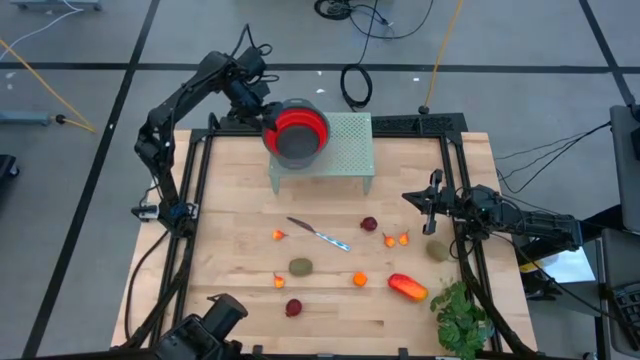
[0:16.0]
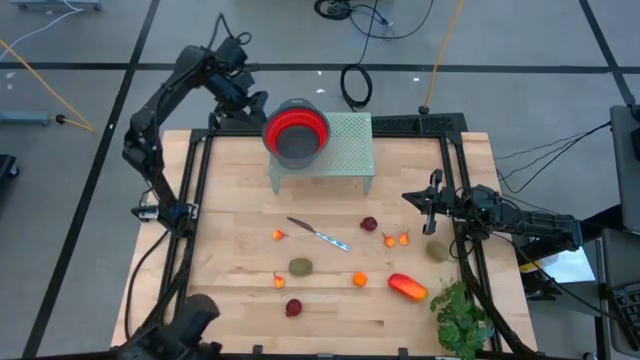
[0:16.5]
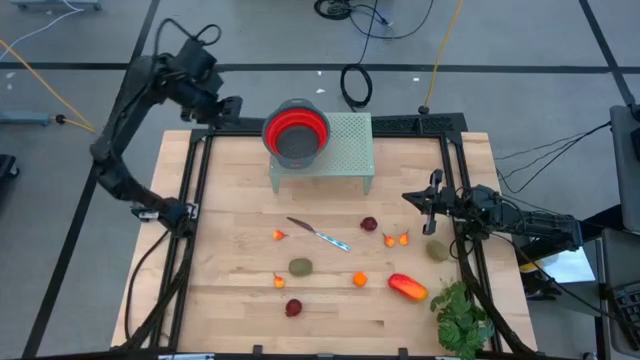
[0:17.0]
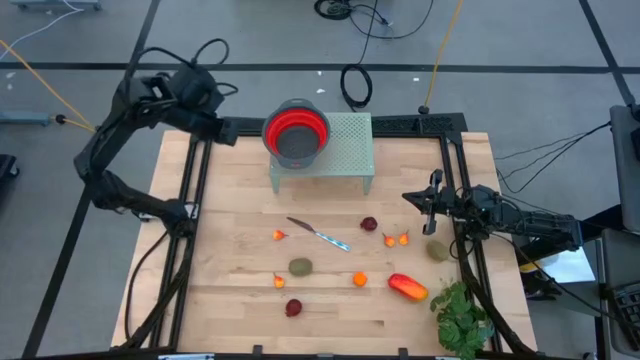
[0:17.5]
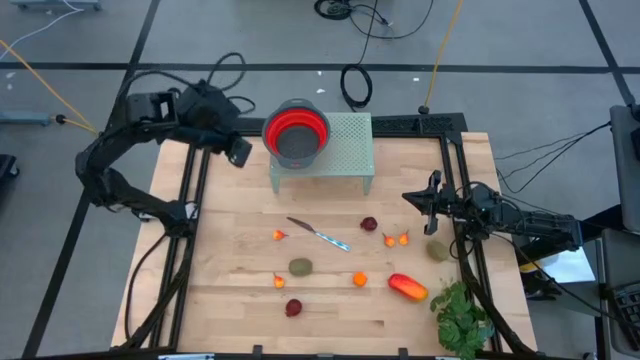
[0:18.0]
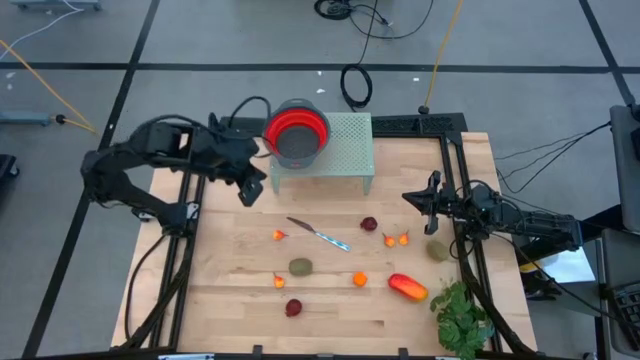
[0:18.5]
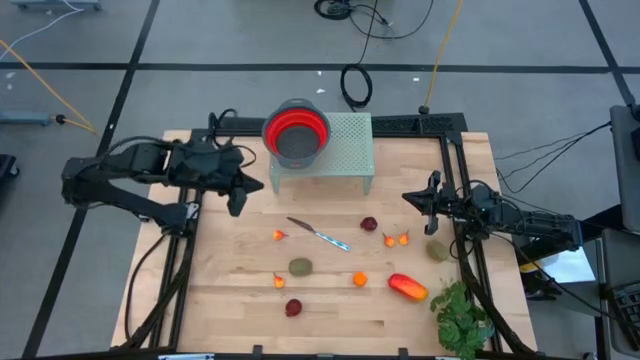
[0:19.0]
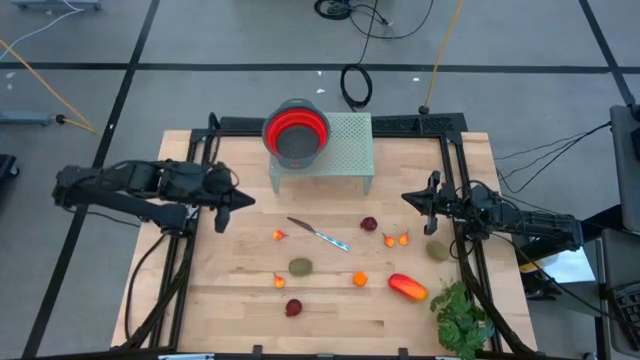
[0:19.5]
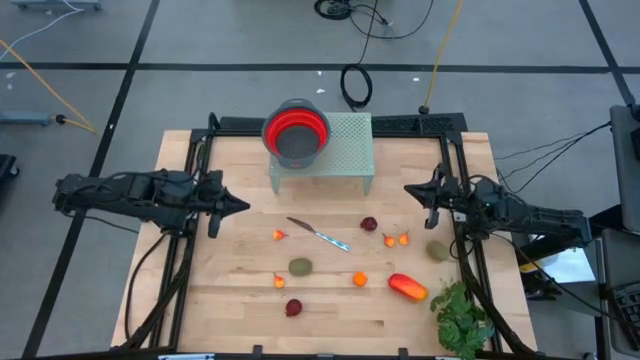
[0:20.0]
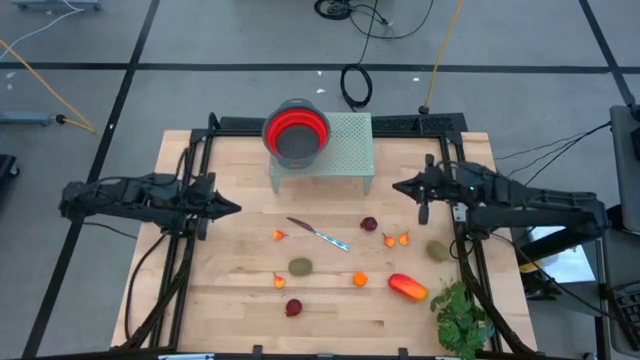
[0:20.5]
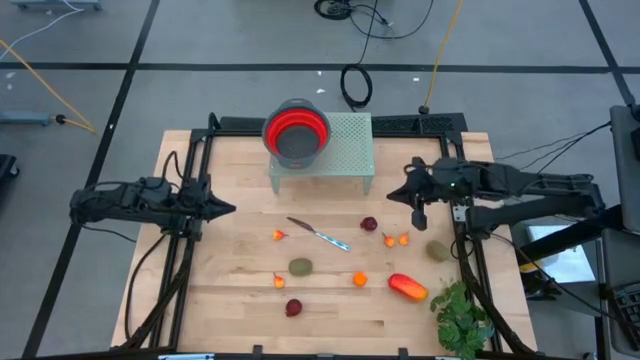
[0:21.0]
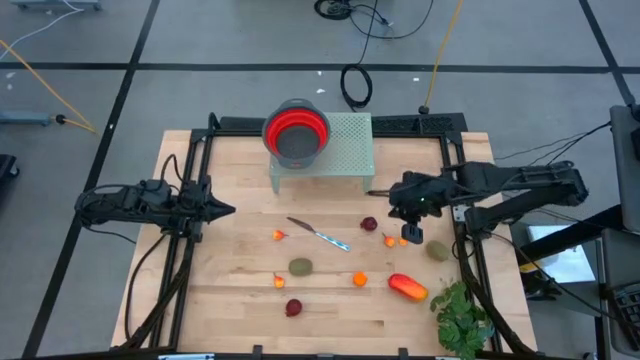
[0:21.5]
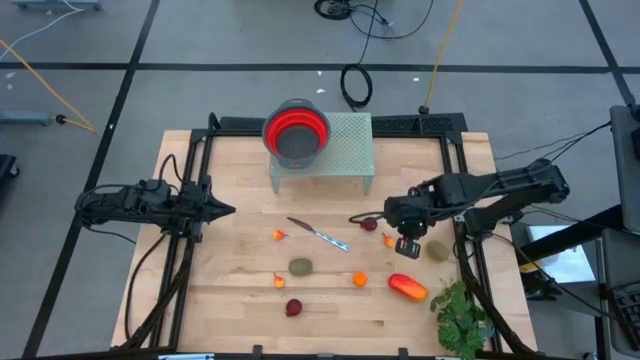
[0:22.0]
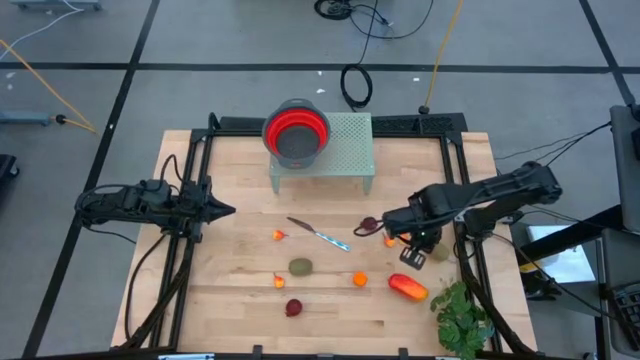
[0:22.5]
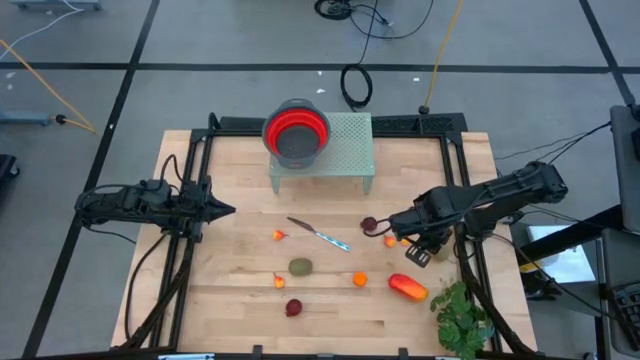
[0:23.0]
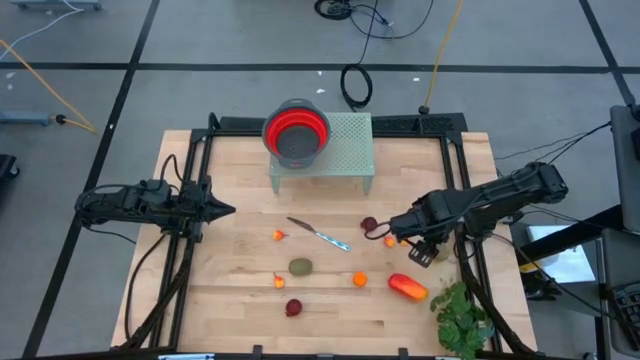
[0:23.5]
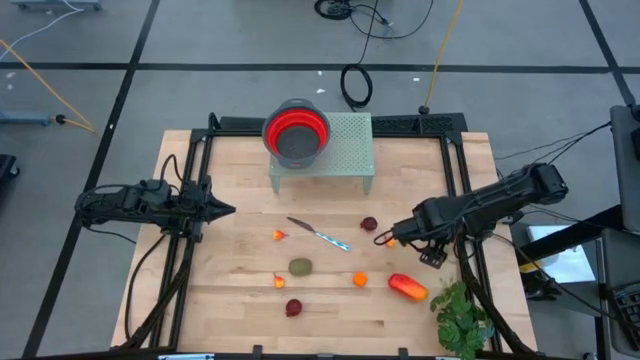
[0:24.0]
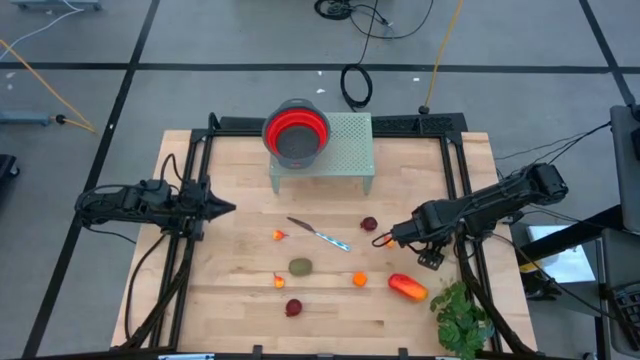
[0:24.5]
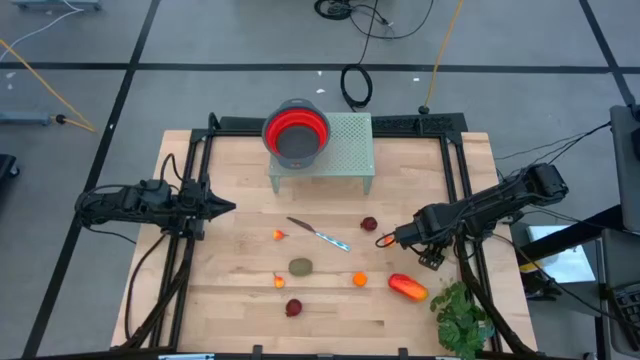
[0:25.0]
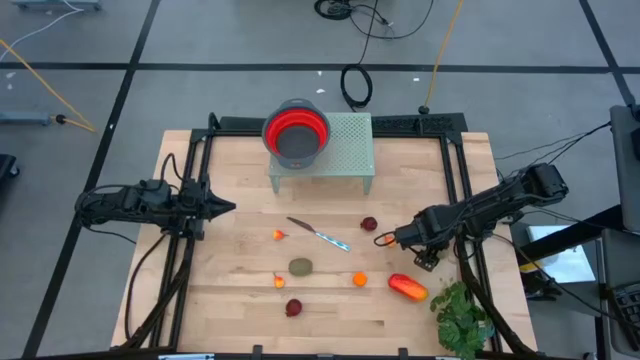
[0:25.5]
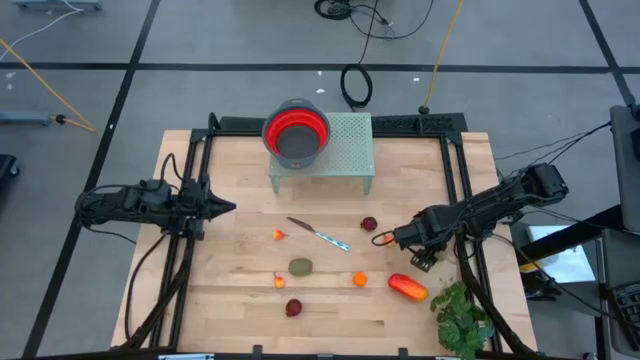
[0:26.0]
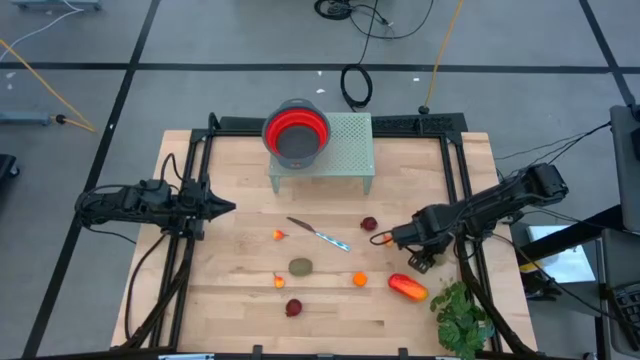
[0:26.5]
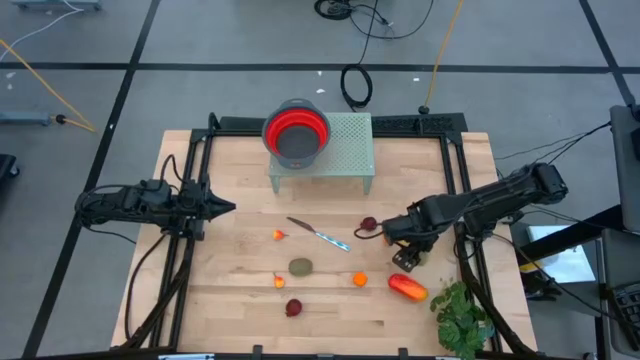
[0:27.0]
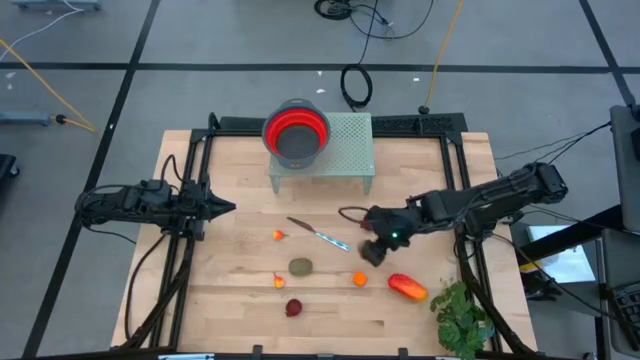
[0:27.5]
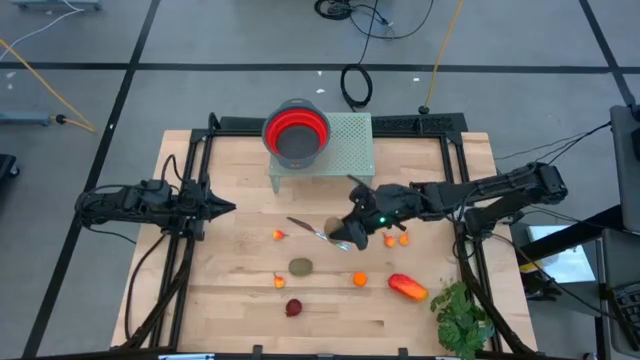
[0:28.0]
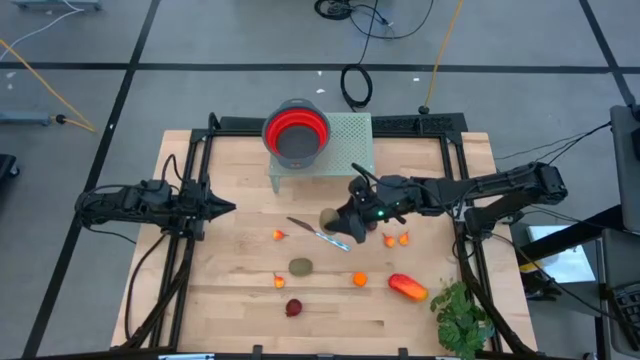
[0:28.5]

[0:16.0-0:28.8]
Task: Pick & Place Fruit
Put the kiwi into the red strainer bowl

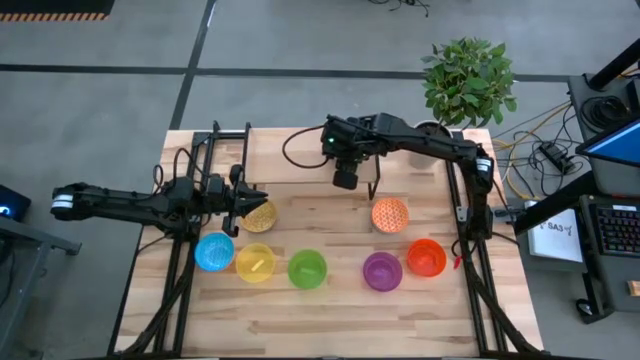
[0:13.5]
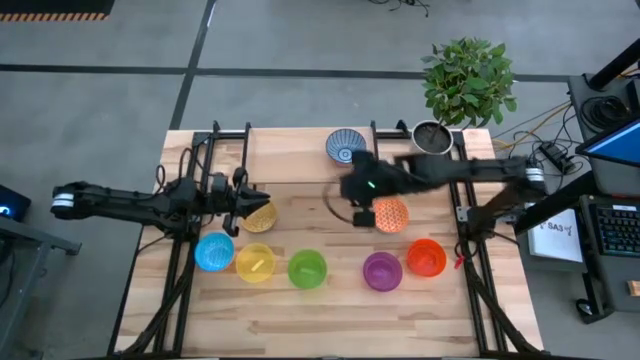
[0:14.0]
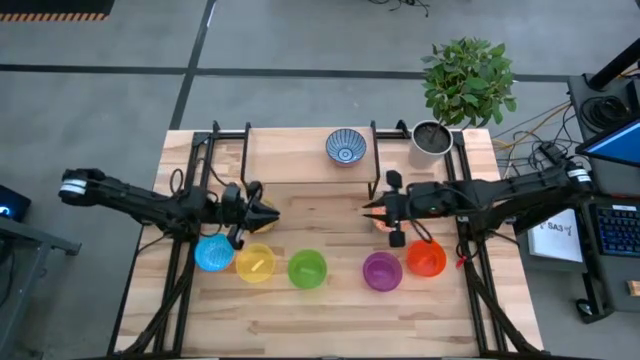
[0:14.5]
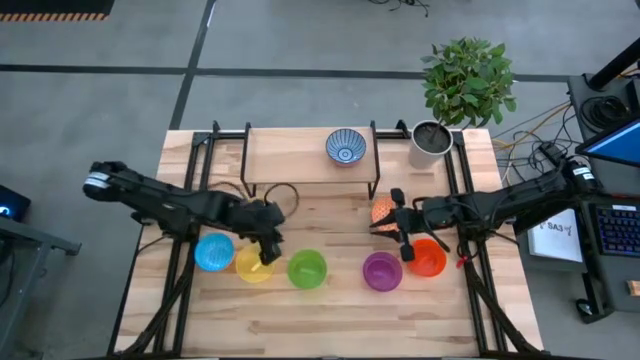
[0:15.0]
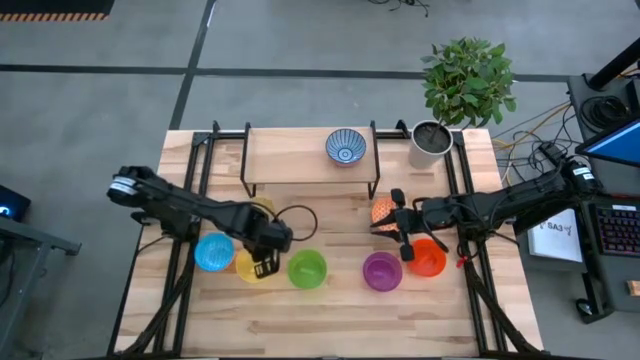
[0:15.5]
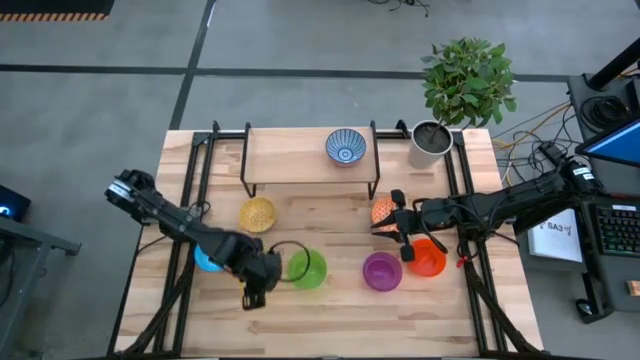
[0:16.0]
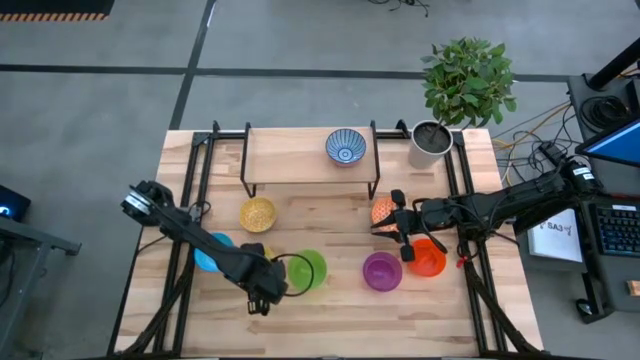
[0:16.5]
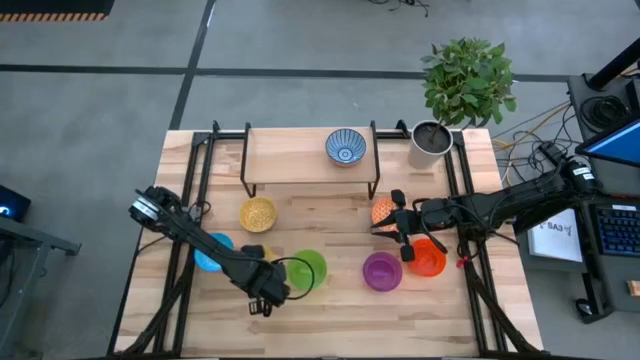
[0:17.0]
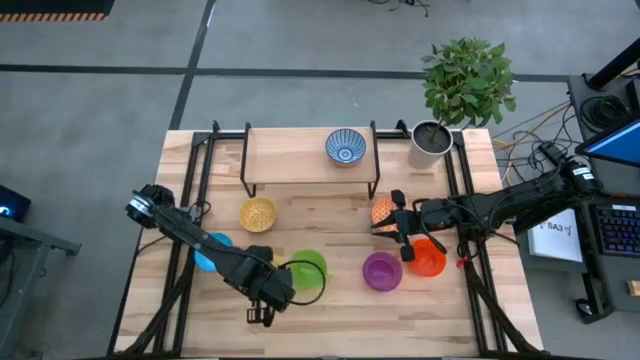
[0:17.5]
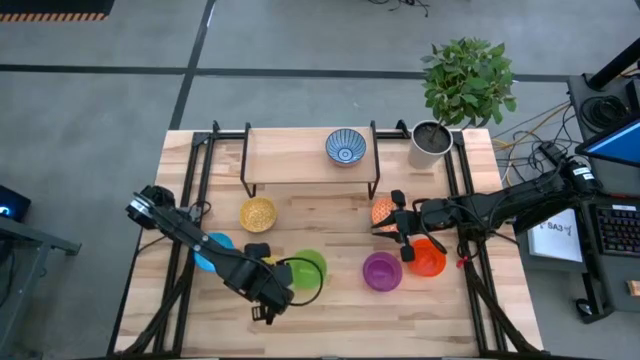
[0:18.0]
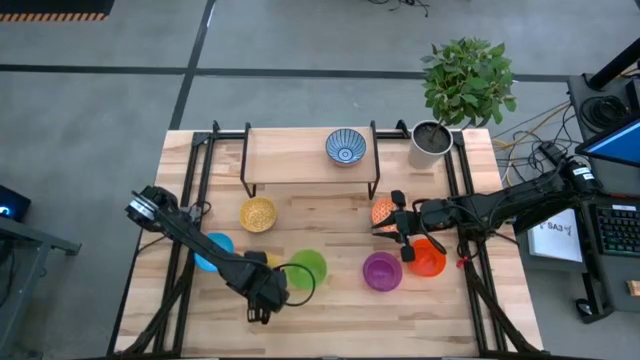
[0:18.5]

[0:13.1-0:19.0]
Task: Place and stack bowls onto a shelf
Put the yellow bowl on the shelf

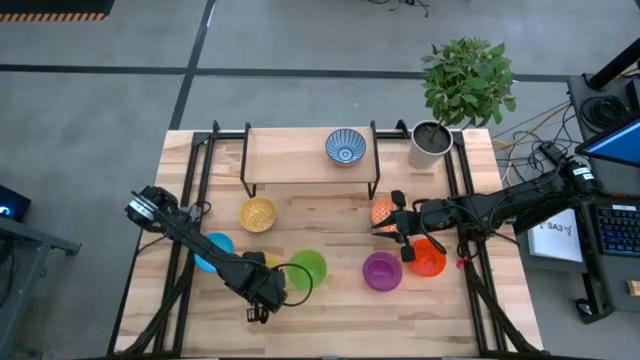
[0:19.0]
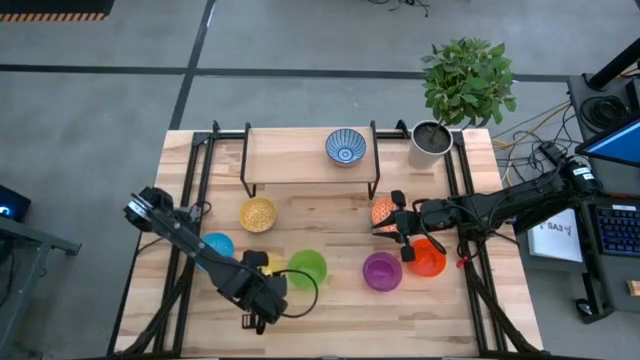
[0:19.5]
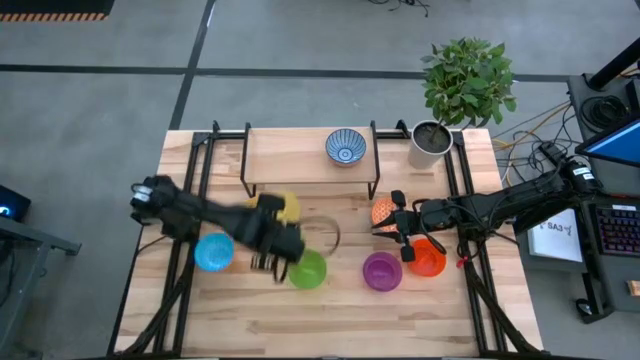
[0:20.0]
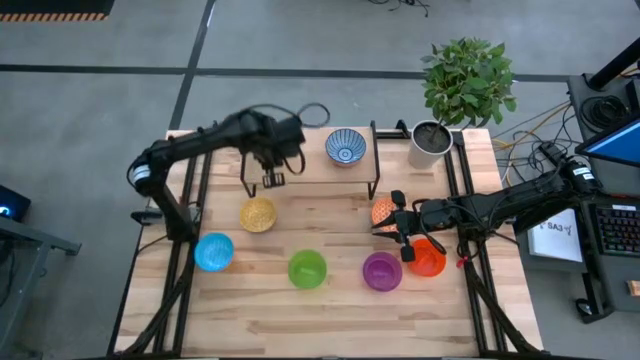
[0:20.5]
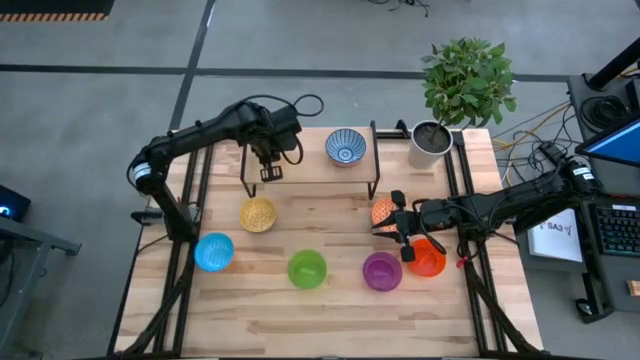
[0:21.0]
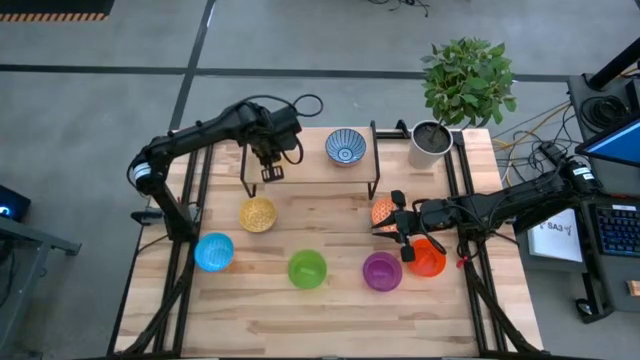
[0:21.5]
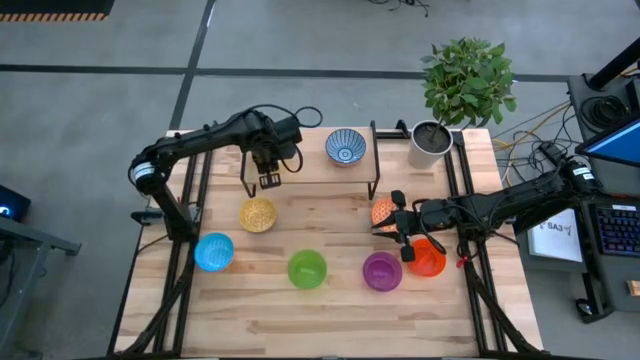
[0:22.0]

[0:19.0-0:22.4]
Put the yellow bowl on the shelf
